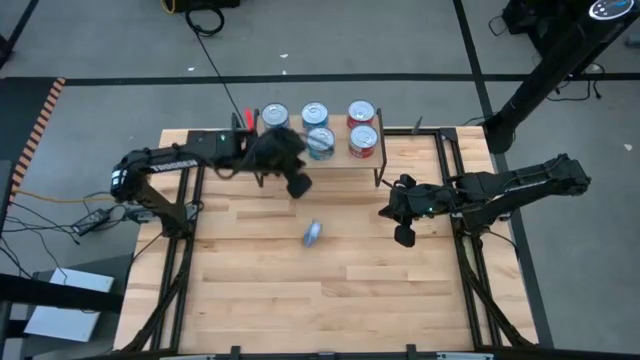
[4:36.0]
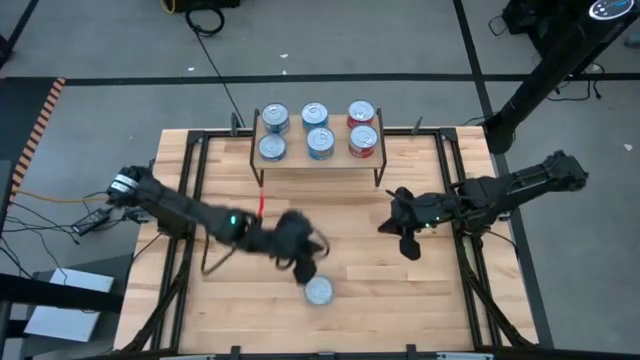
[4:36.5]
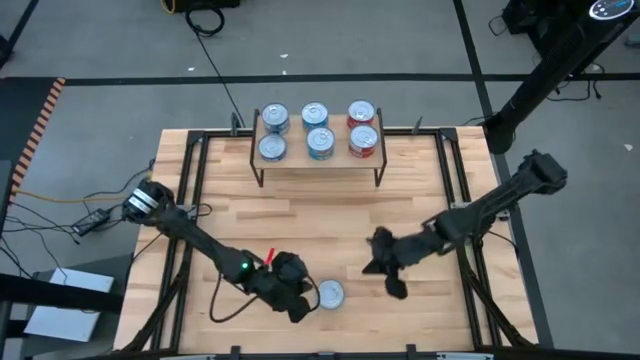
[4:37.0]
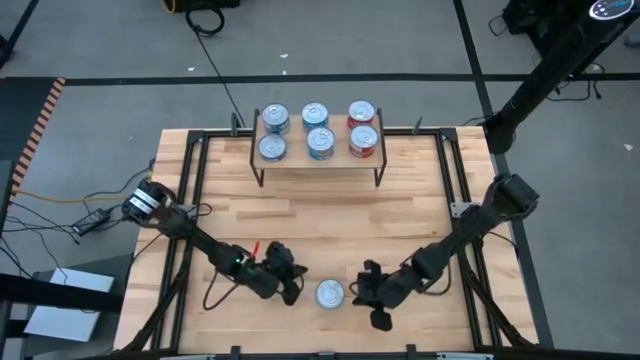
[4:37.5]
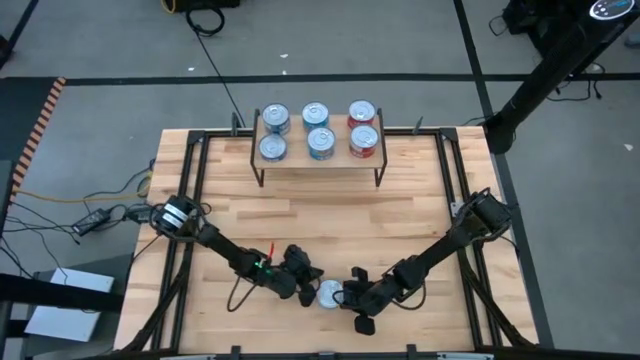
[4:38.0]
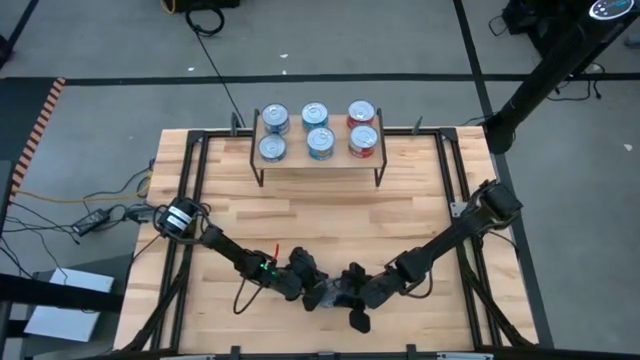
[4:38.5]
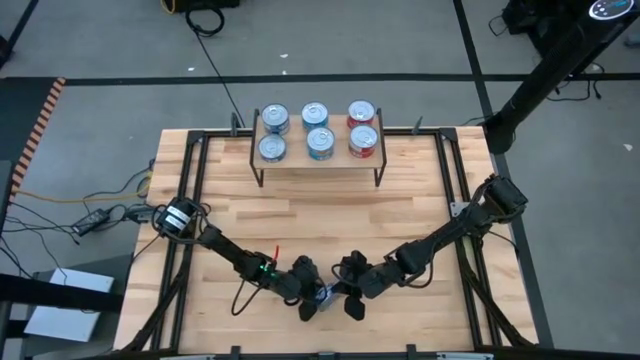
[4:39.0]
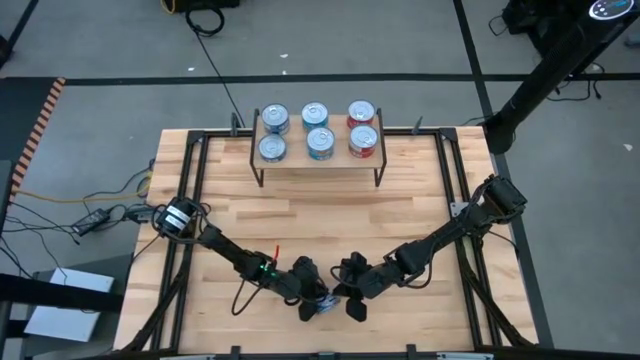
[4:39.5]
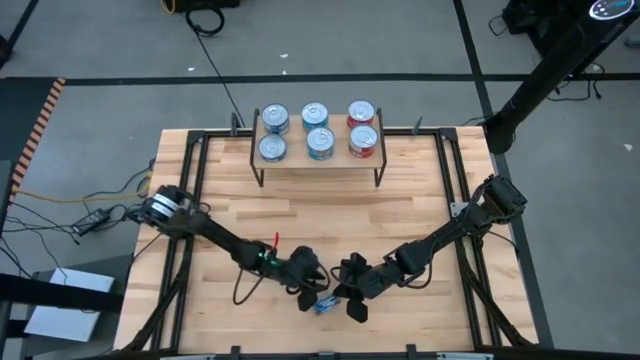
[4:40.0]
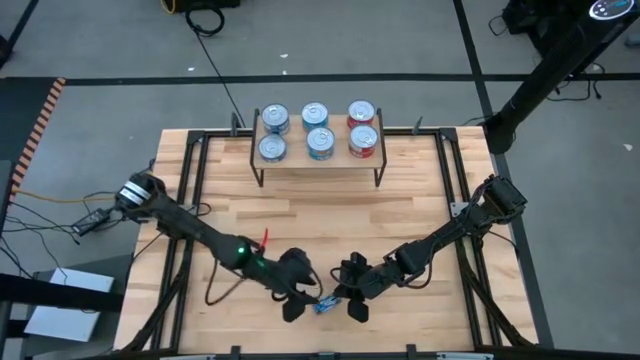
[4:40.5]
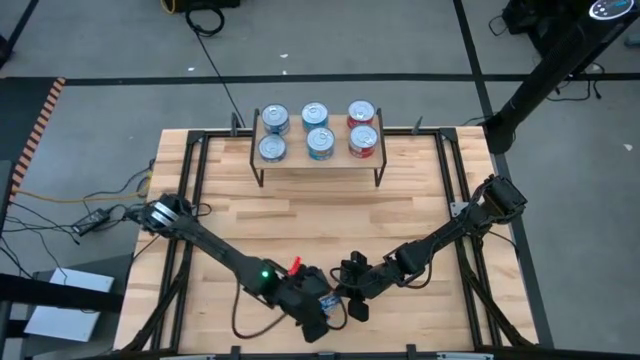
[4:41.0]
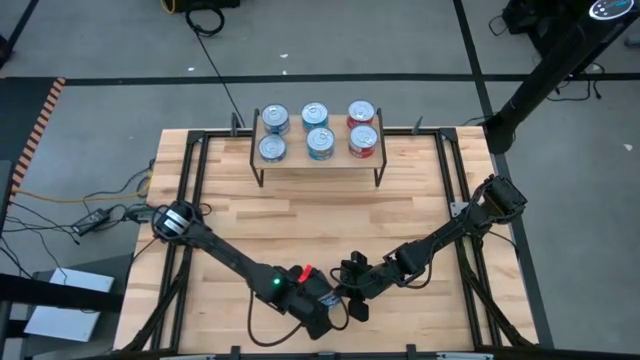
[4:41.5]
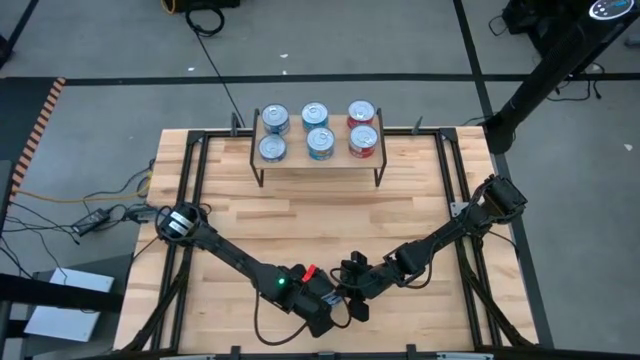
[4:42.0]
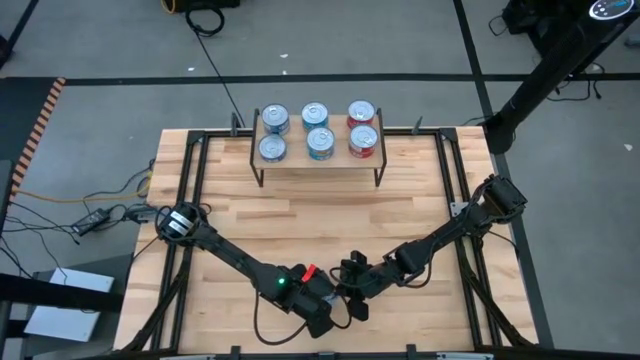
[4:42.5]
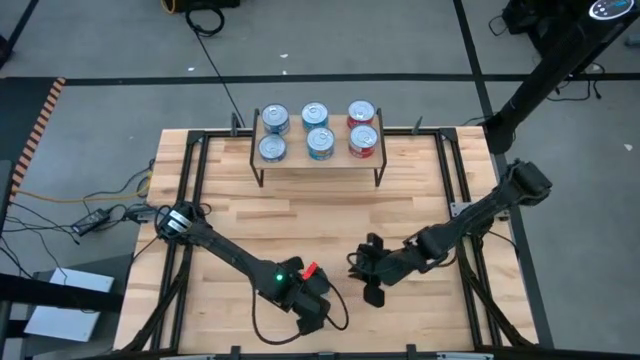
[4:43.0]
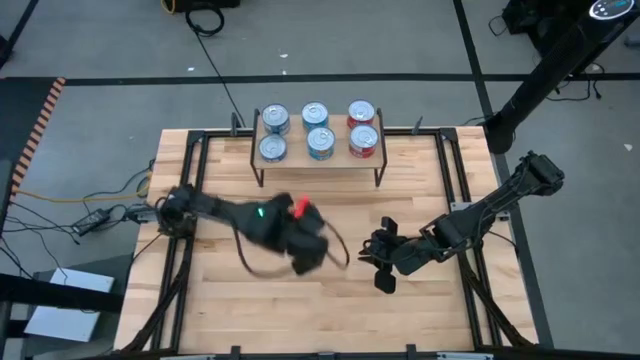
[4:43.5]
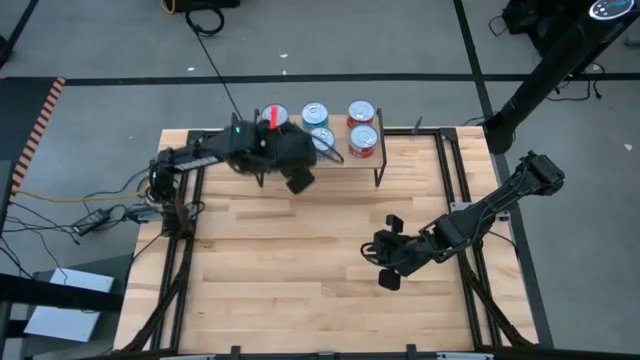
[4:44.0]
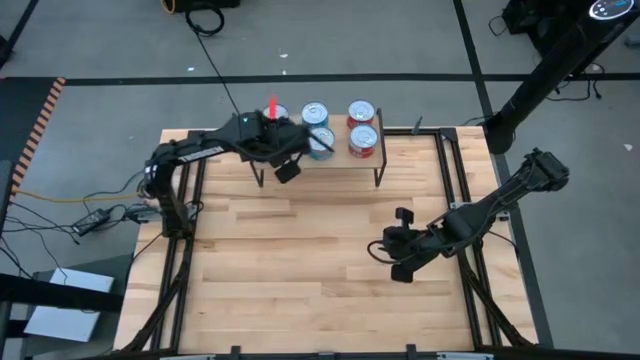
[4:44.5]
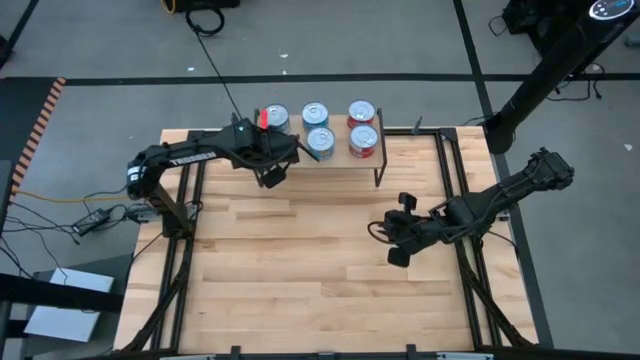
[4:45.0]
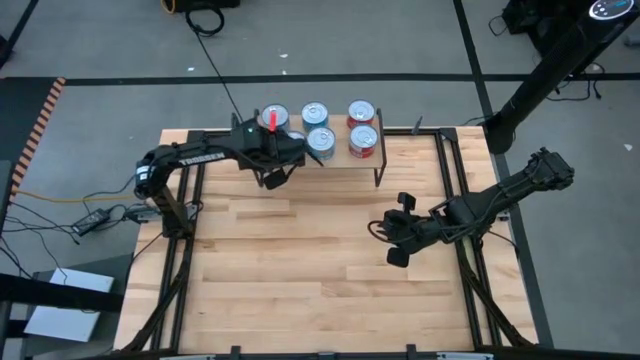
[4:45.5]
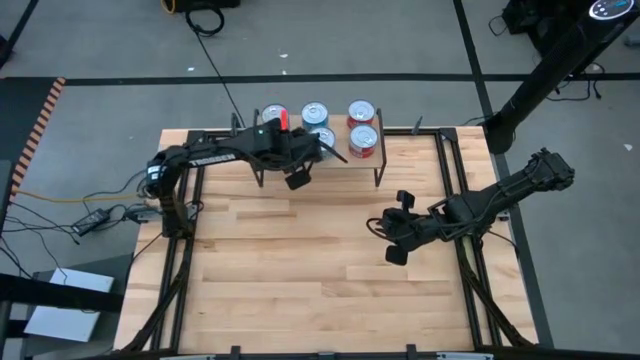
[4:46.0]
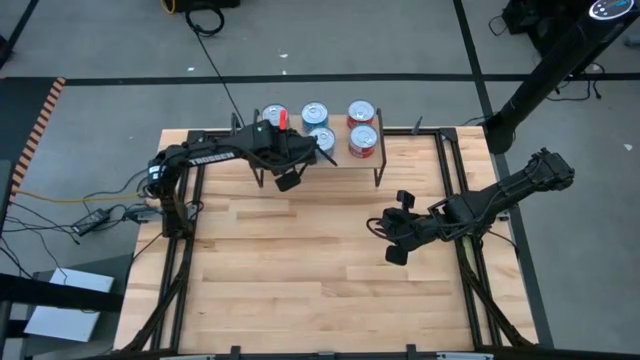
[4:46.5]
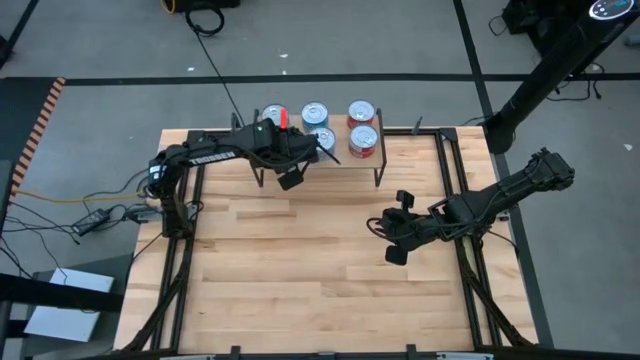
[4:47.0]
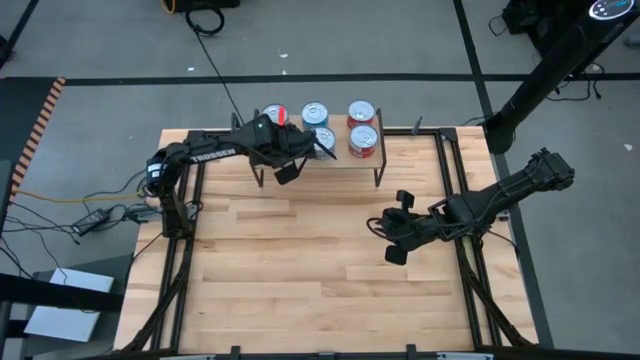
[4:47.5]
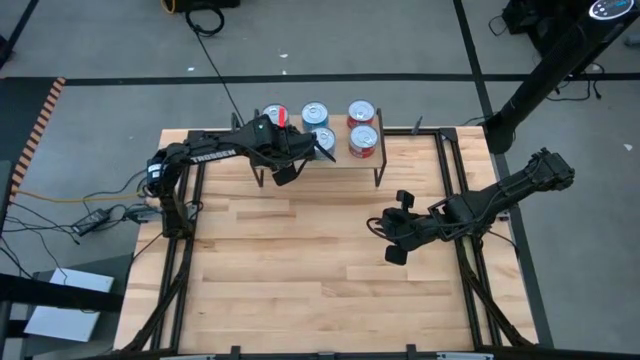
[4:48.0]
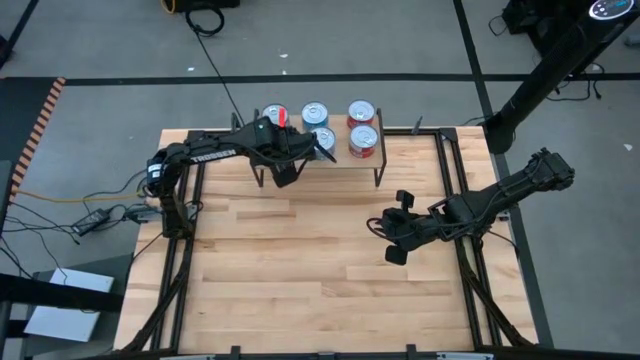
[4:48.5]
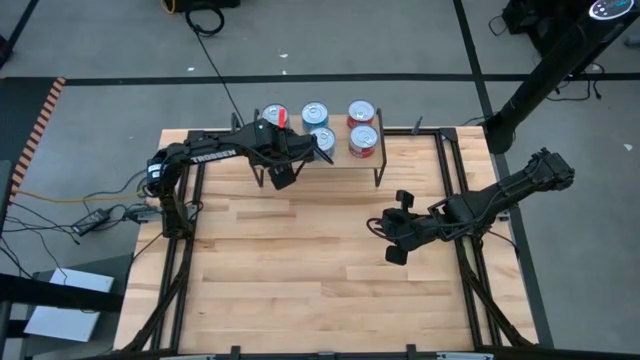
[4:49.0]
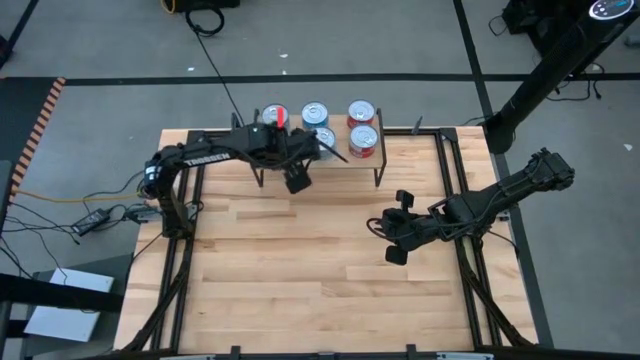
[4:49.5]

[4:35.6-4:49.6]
Task: Stack canned seafood by type on shelf
Stack the blue can into the bottom blue can on the shelf

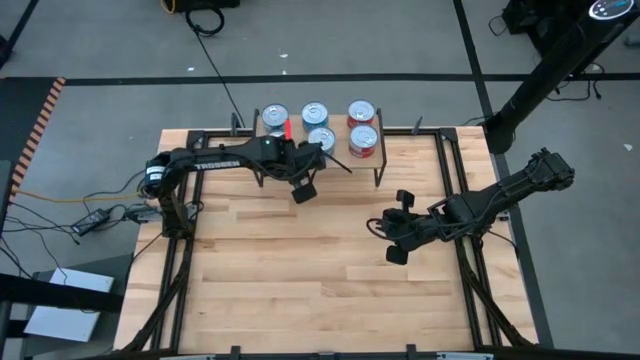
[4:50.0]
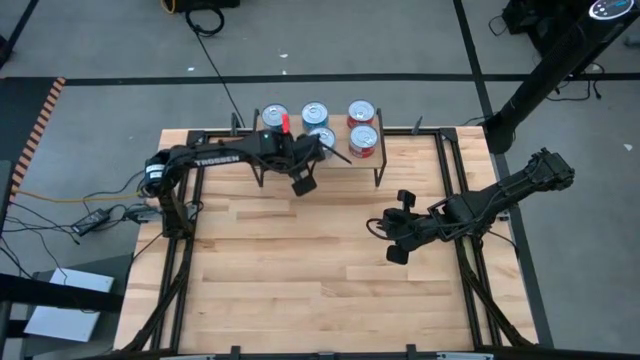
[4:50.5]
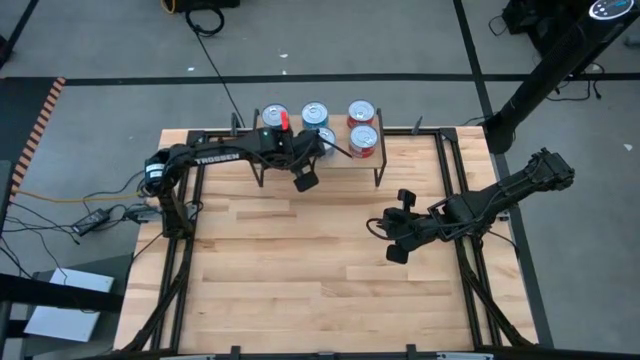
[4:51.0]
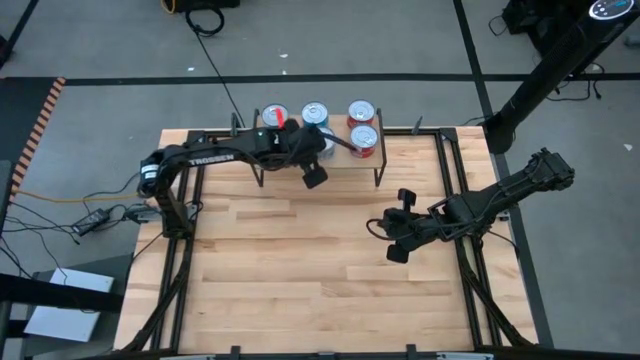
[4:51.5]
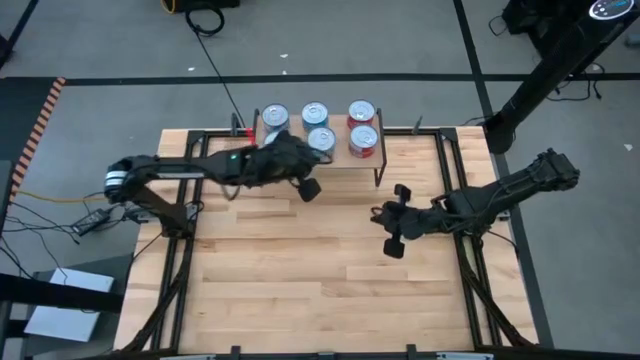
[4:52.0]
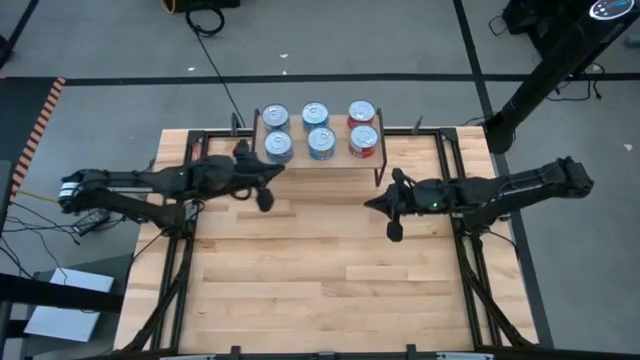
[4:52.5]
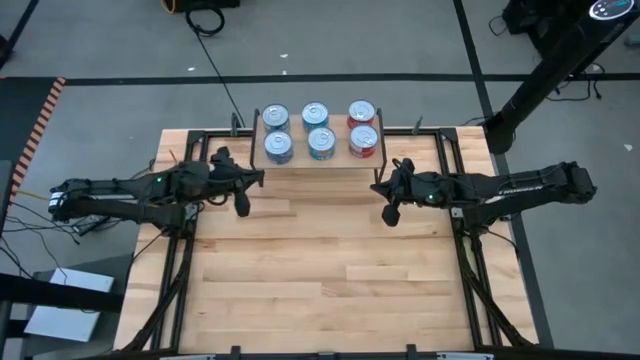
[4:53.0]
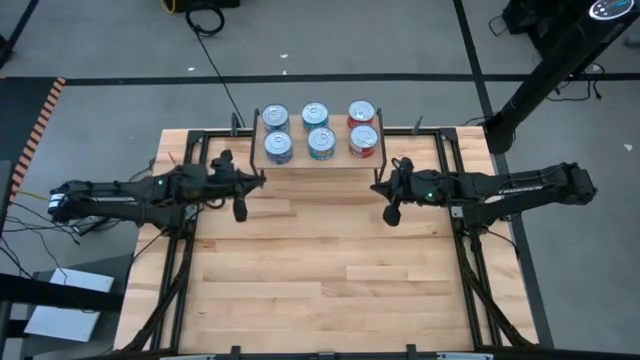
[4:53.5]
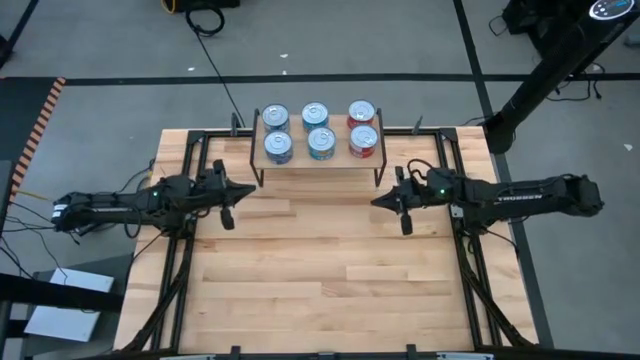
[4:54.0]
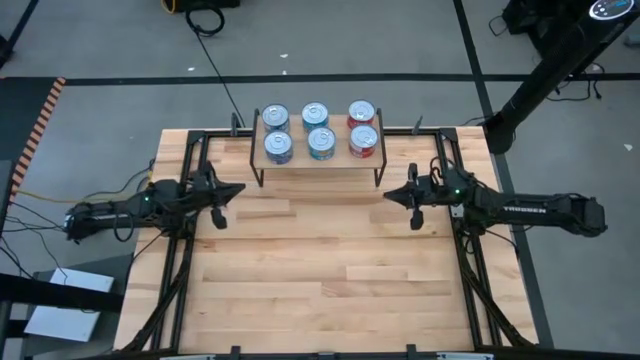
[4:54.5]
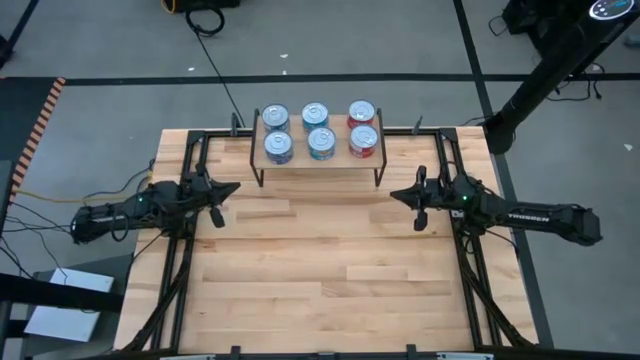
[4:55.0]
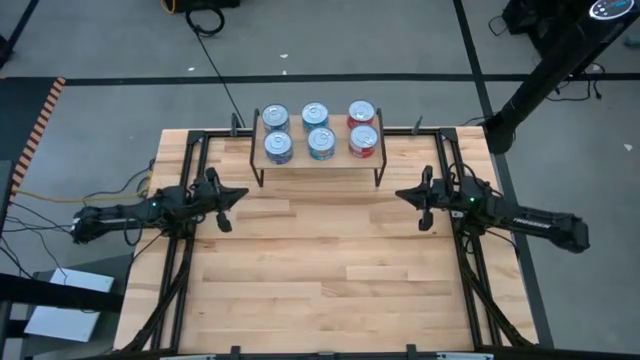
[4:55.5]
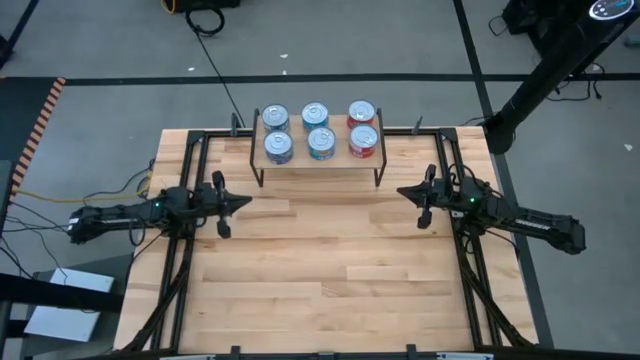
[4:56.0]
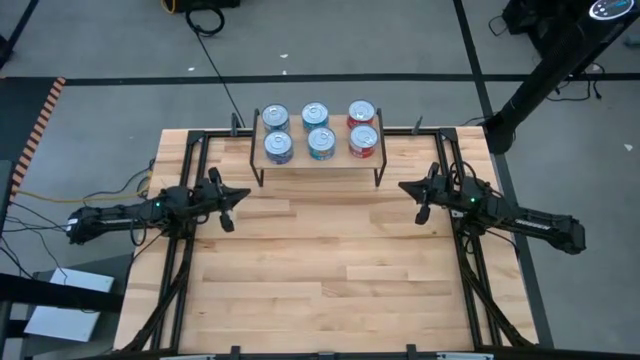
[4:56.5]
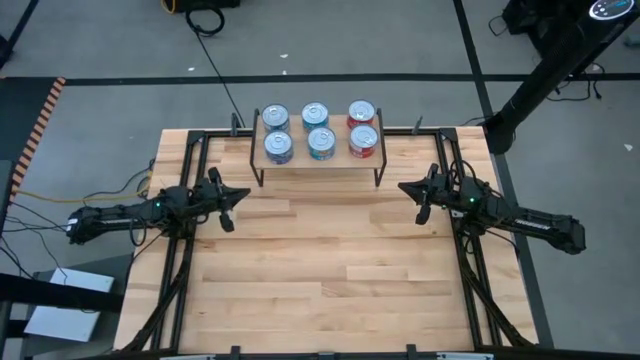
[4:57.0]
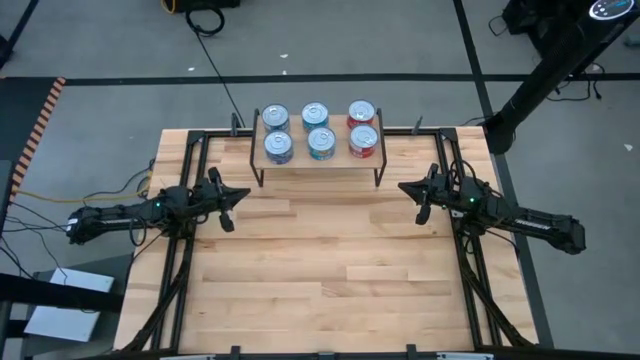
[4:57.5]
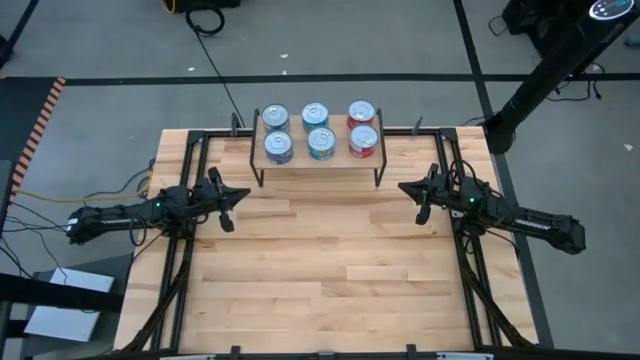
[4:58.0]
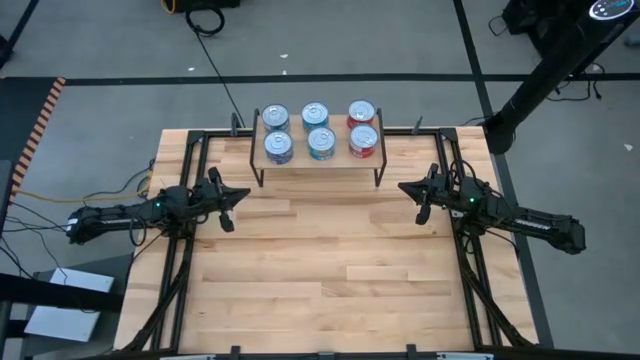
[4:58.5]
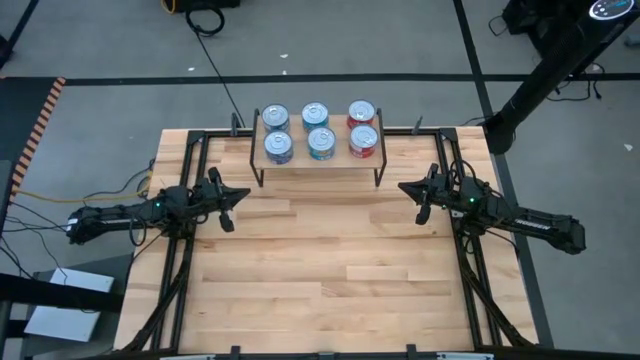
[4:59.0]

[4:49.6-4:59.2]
Return to Home Position
